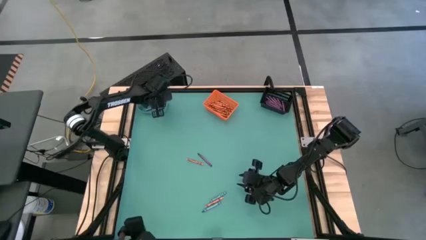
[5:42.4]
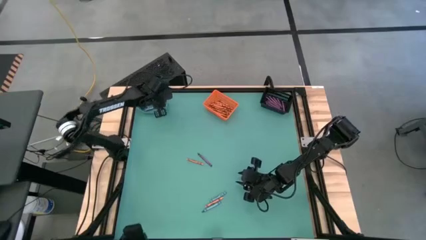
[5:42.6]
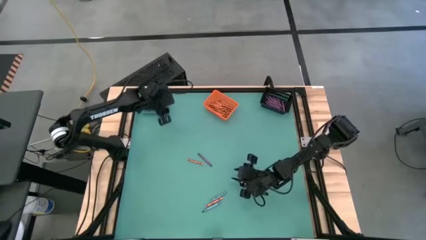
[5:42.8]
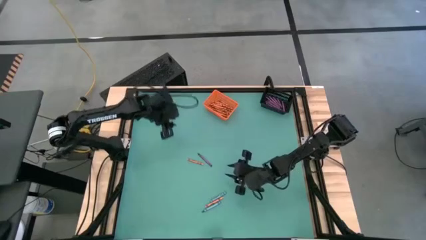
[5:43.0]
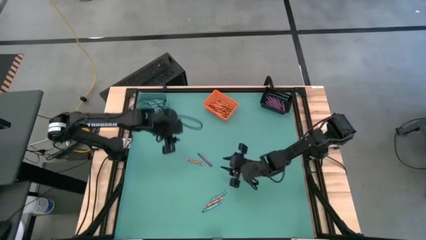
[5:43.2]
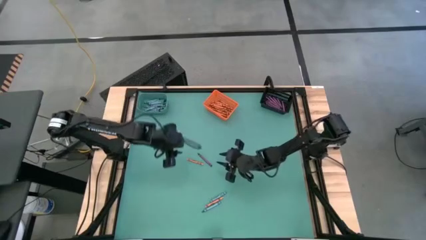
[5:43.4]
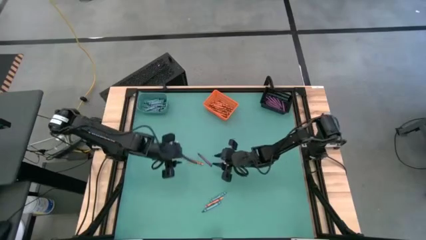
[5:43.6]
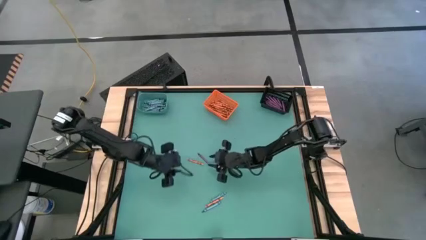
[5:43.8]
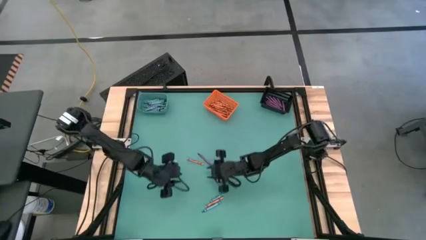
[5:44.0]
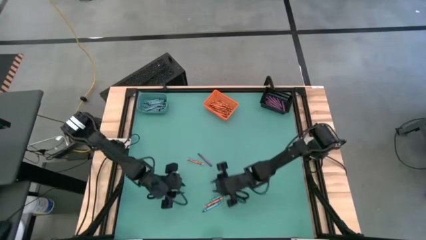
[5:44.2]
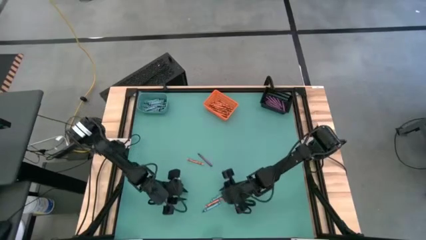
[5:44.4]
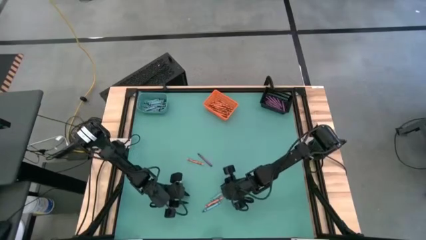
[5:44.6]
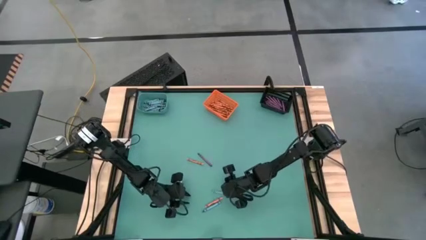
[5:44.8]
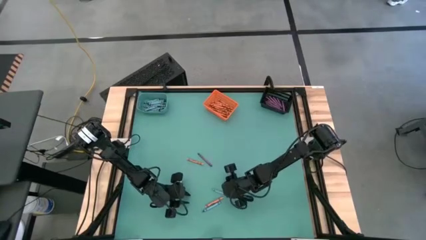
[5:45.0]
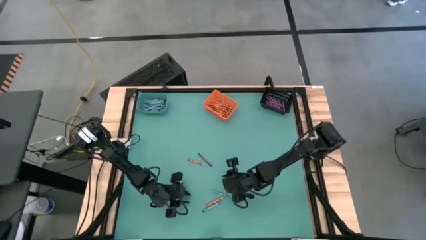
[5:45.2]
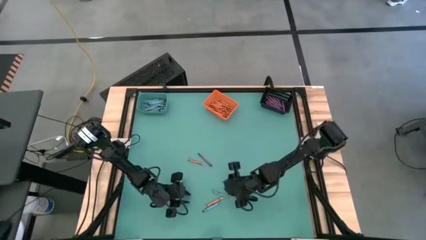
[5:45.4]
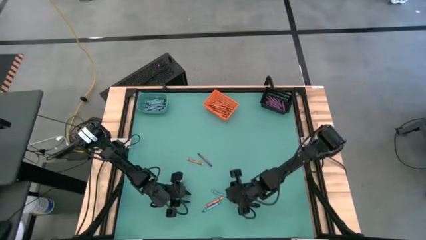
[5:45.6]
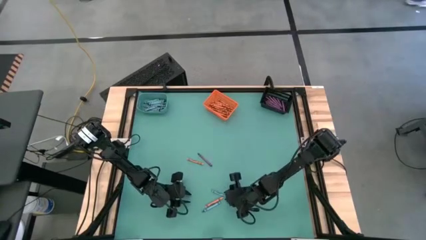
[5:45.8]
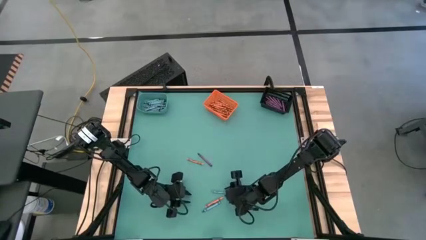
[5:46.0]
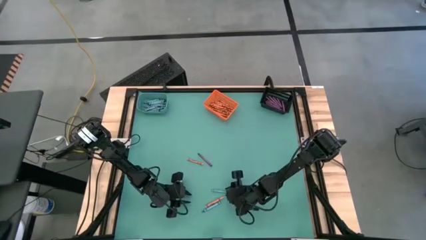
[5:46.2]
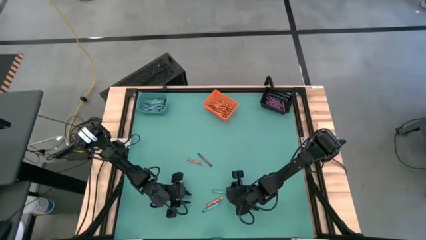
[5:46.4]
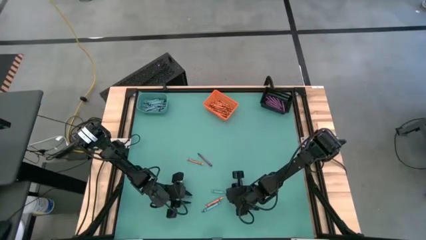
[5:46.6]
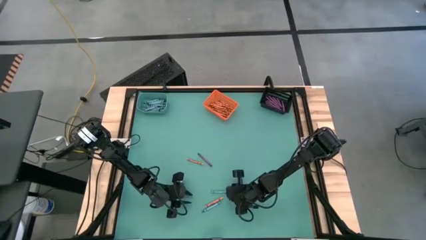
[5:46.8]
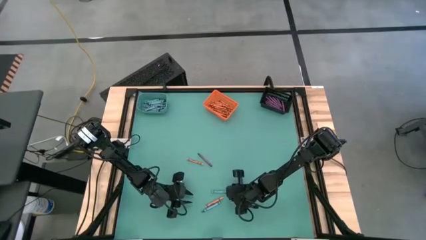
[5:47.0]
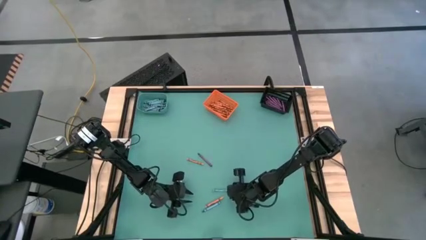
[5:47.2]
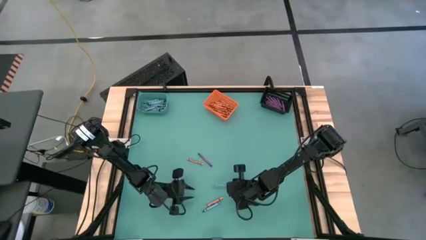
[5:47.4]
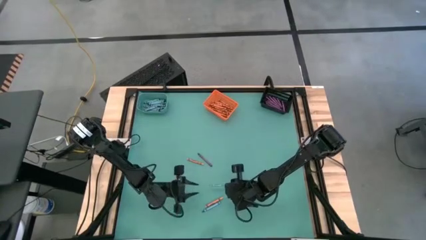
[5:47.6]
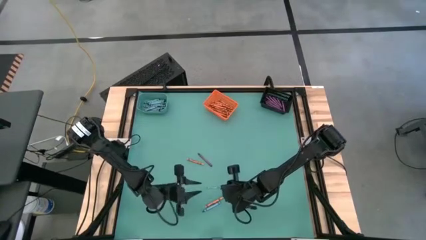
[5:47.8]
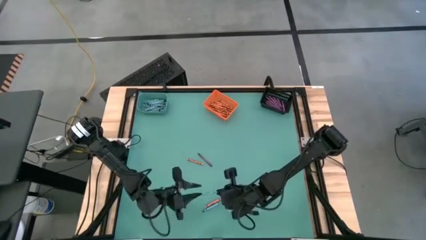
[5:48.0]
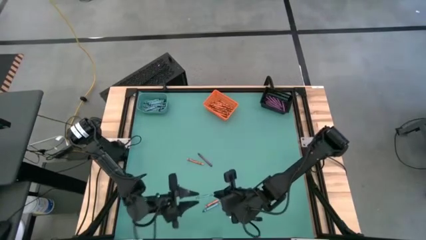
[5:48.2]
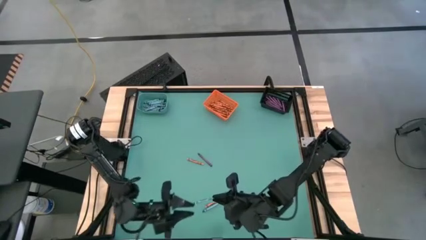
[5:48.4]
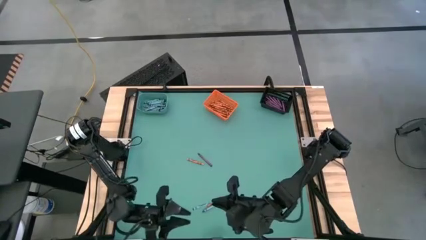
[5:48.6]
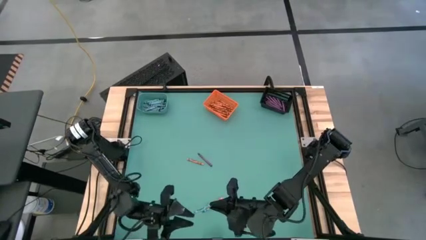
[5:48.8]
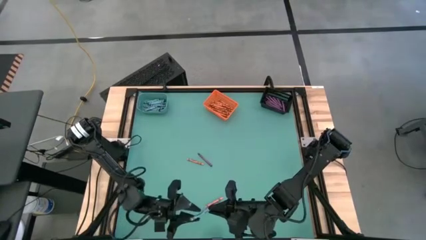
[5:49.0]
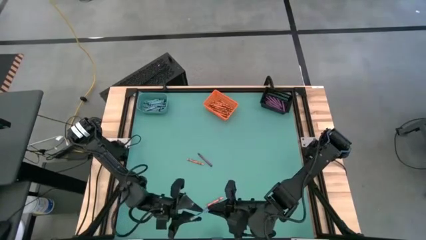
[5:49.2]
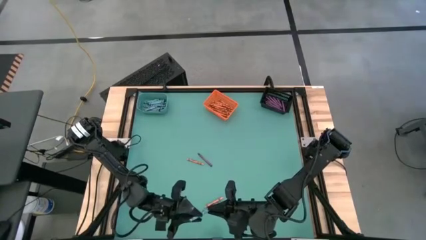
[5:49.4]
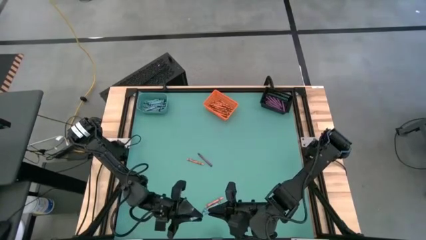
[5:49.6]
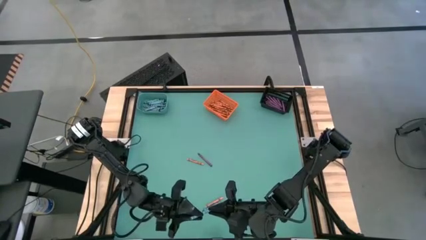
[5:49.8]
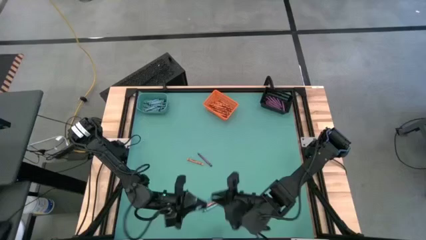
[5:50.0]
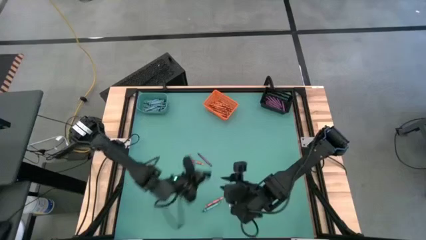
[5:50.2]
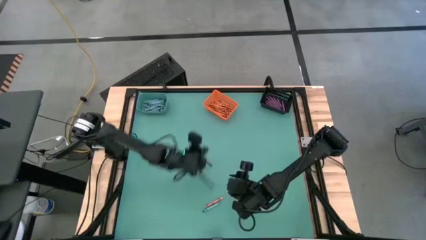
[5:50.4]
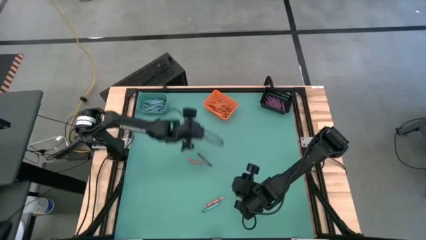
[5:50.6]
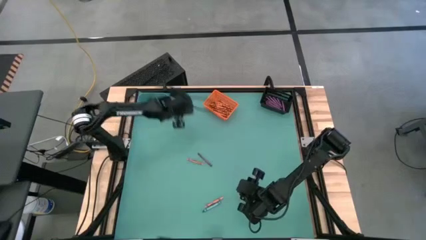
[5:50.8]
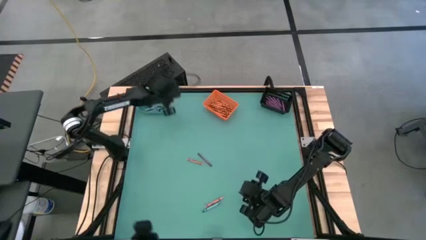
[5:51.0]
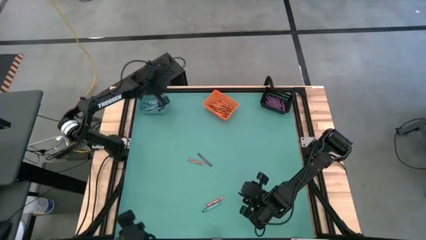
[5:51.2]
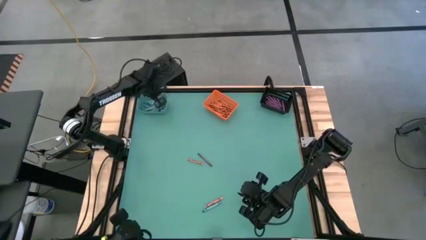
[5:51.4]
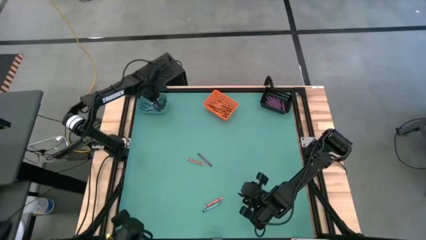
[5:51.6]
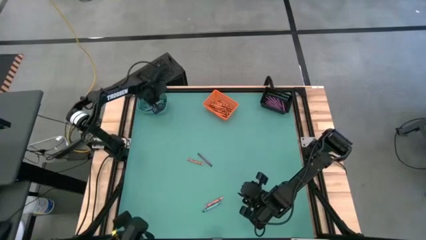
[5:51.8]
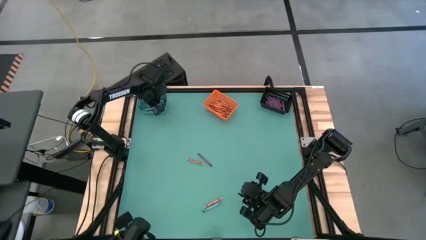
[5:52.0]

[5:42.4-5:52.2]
Task: Sort crayons
Put the blue crayon into the blue bin

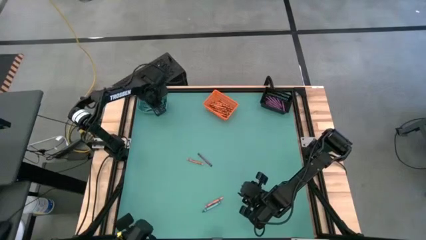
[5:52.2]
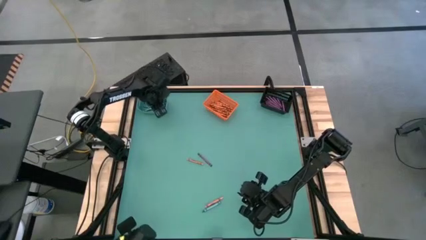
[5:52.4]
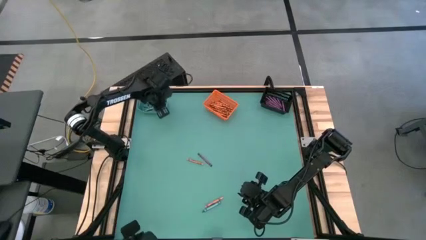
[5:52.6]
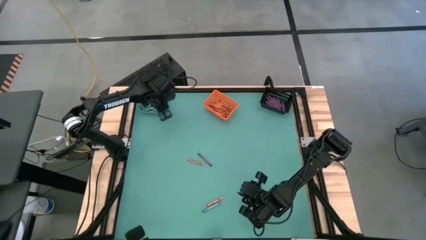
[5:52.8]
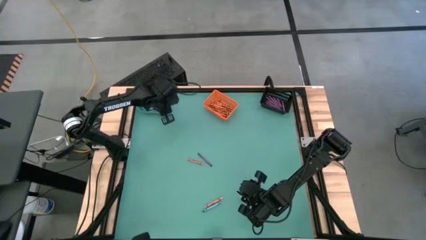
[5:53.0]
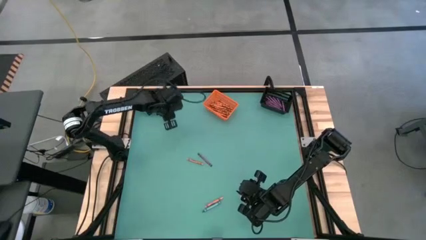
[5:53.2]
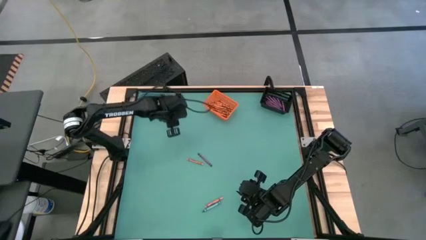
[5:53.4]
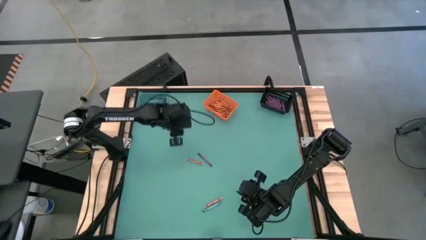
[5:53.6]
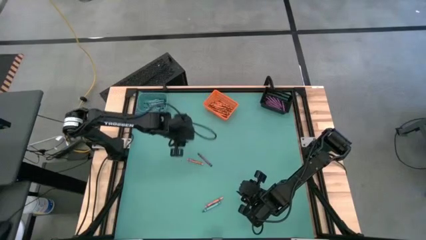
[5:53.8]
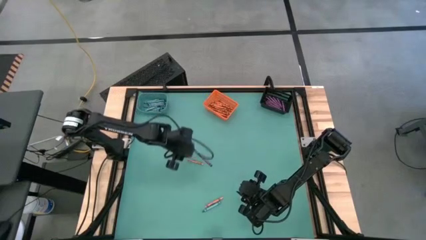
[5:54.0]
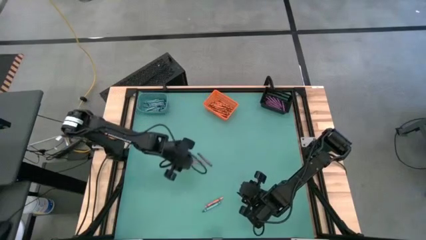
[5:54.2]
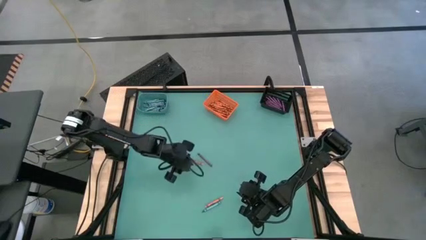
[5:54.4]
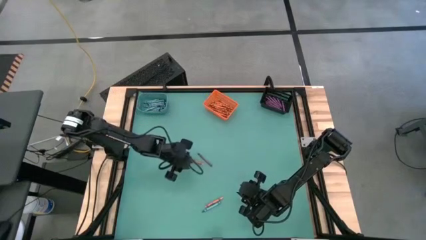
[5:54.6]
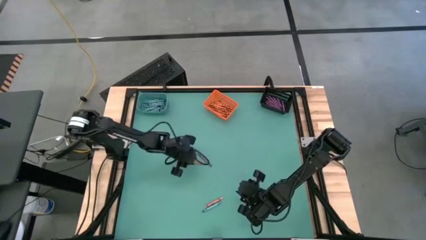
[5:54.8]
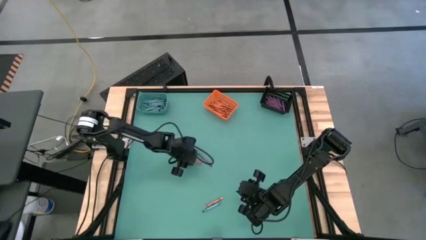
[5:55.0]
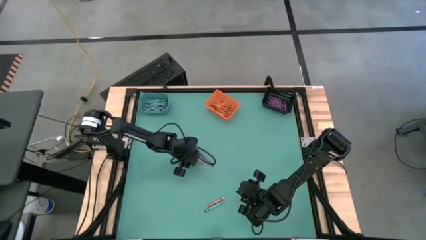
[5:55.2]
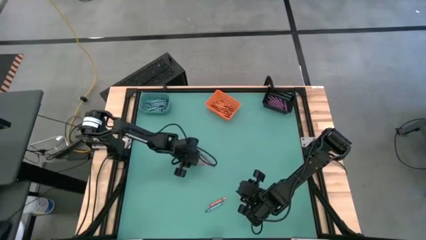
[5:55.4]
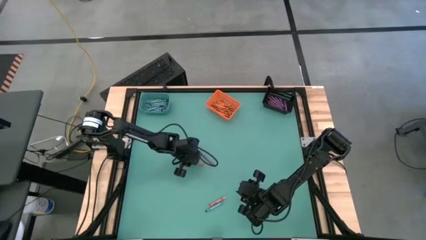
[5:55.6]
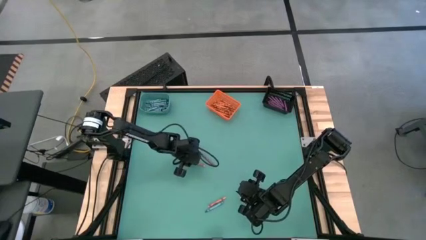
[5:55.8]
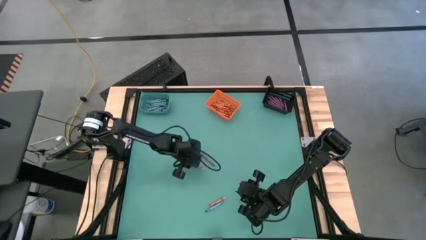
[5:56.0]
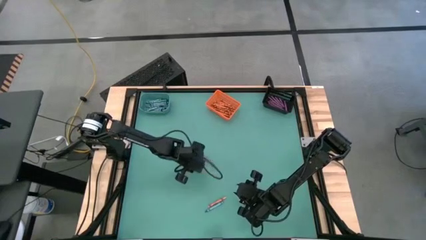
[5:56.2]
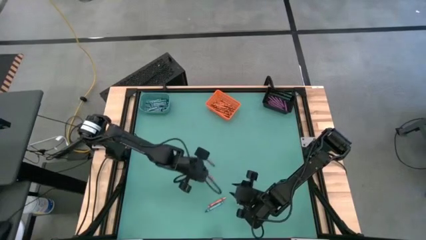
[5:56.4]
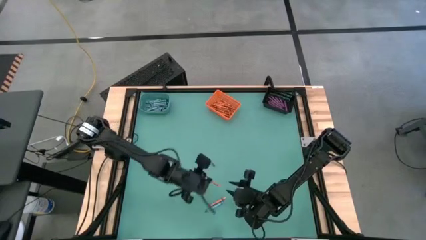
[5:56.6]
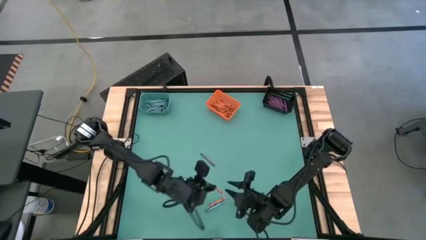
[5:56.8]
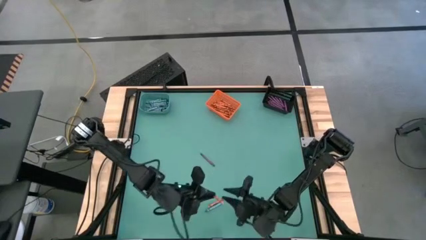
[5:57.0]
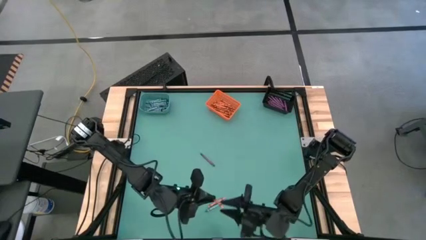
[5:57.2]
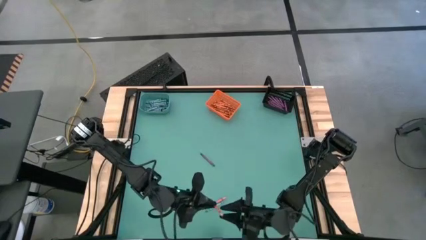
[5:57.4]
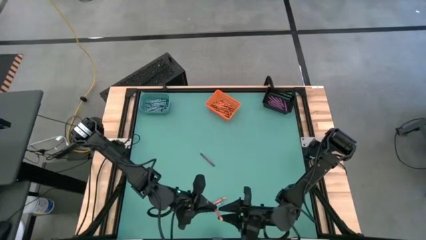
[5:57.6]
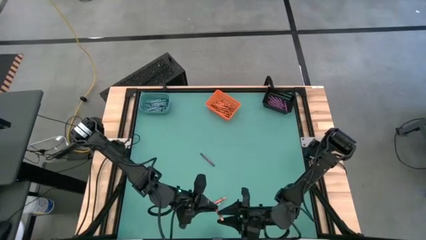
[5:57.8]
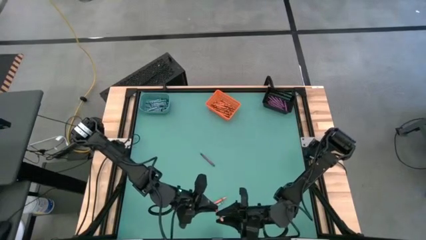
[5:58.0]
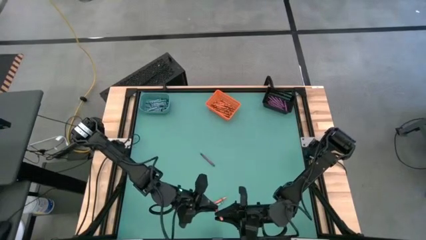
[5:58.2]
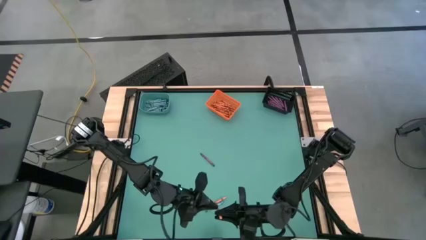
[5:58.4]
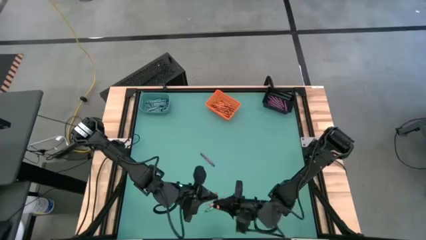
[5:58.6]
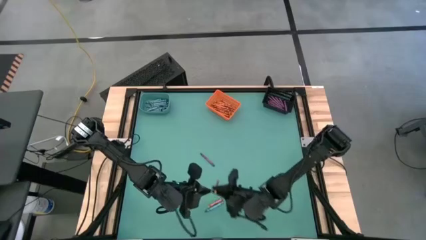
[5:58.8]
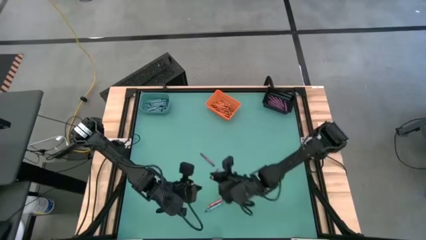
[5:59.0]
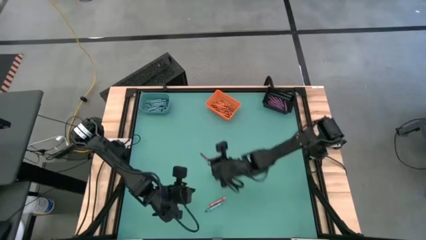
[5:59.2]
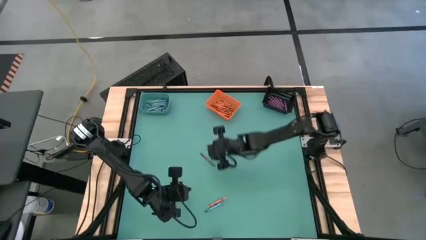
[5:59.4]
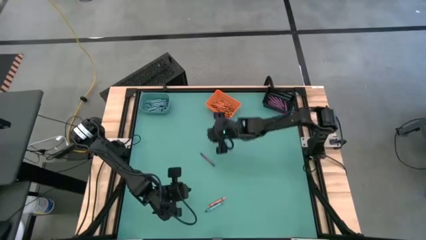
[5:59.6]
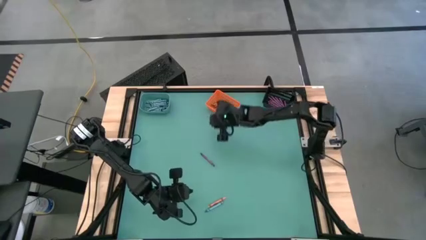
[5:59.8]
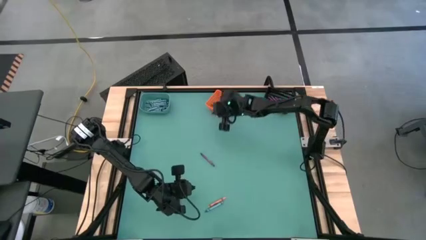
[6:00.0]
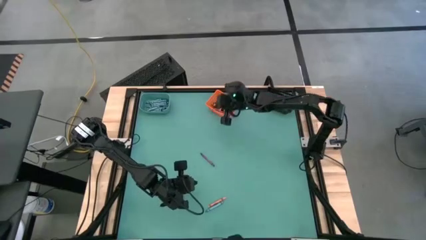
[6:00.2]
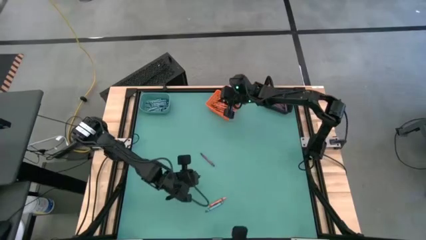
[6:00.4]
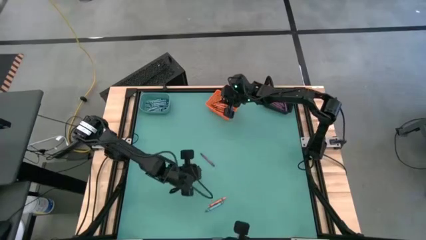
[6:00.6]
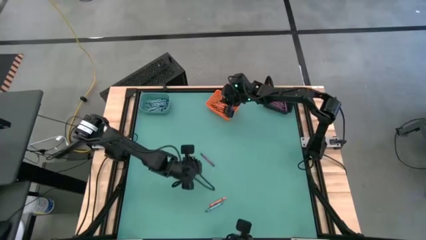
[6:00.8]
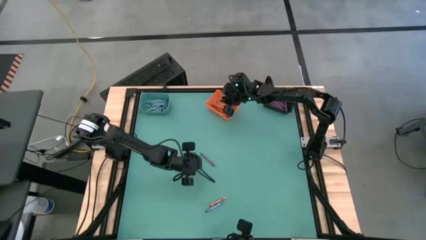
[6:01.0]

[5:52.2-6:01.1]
Put the orange crayon into the orange bin
